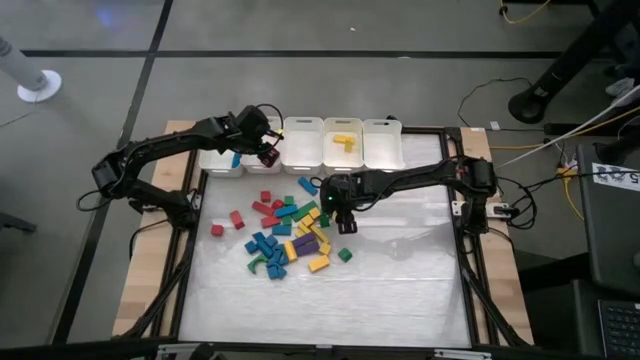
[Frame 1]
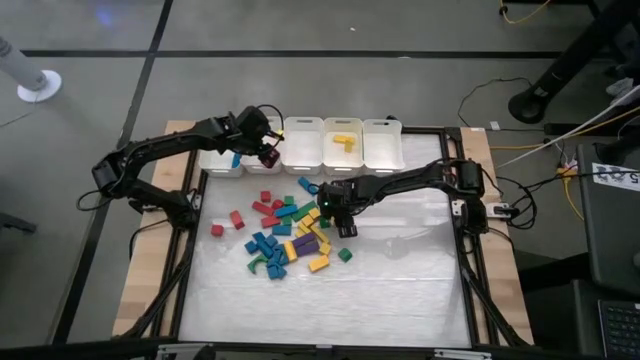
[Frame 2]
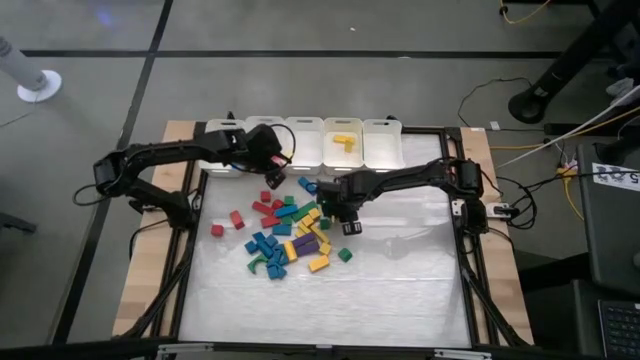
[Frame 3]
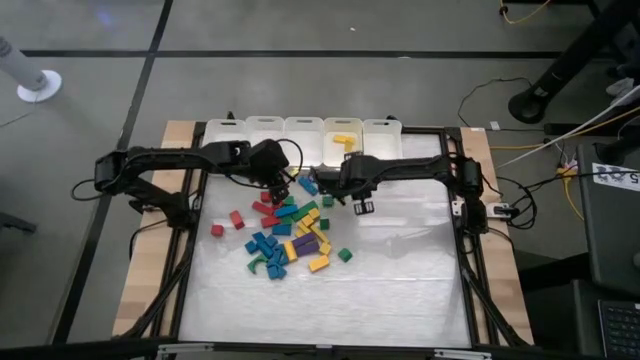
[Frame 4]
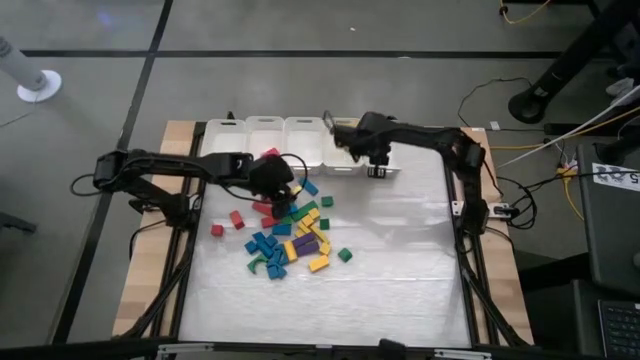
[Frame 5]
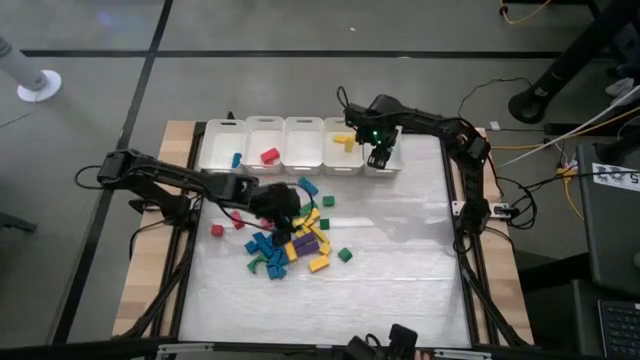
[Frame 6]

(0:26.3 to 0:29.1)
Task: Sort blocks
Put the green block into the right white bin

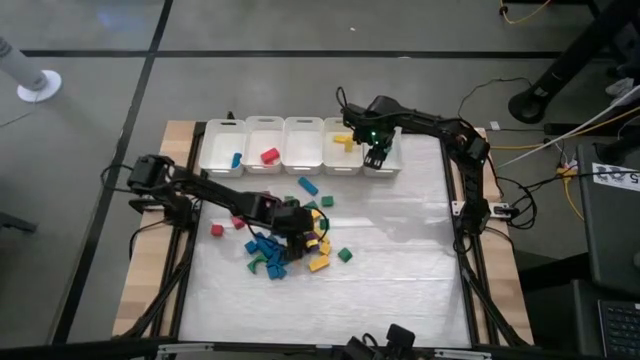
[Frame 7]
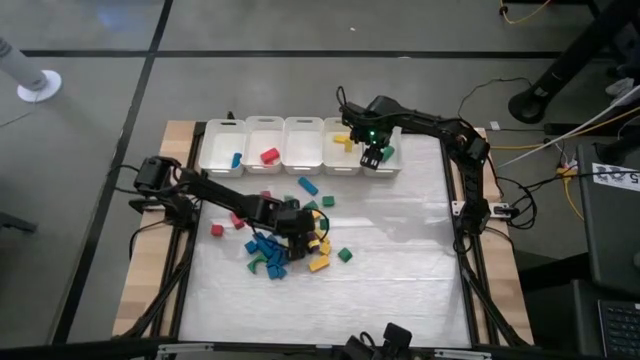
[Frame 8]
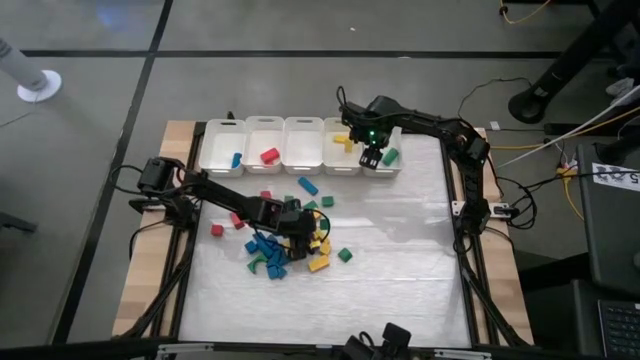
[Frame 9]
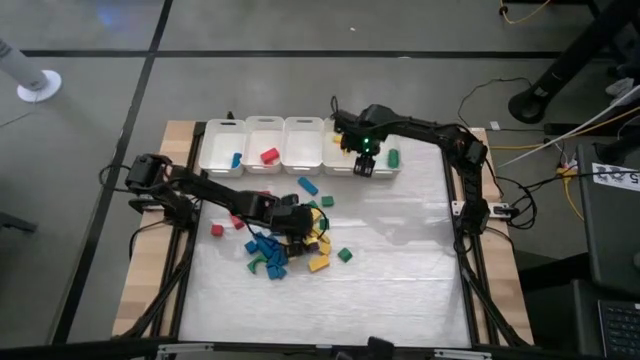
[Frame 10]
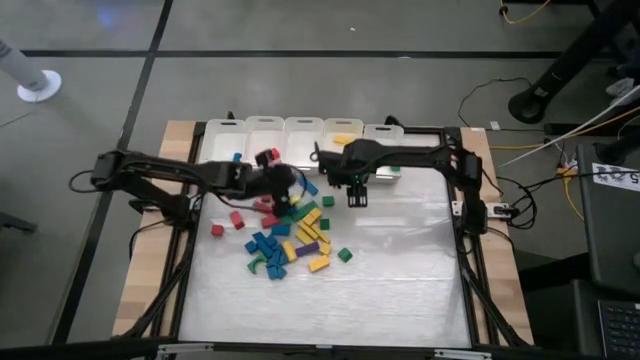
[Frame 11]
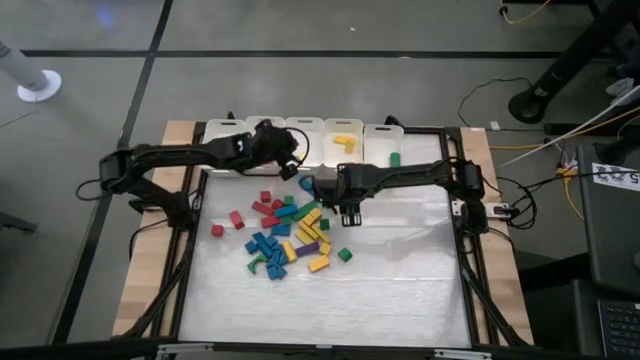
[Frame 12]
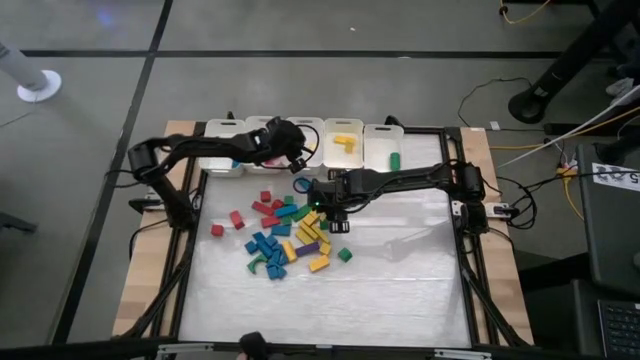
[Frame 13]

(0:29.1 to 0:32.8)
Put the violet block into the middle white bin

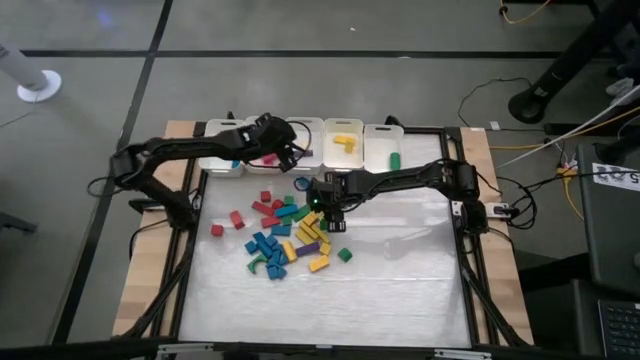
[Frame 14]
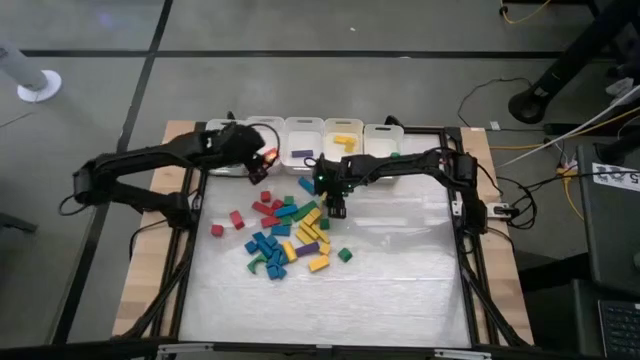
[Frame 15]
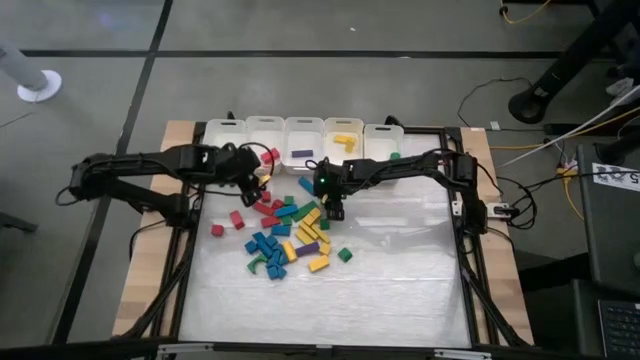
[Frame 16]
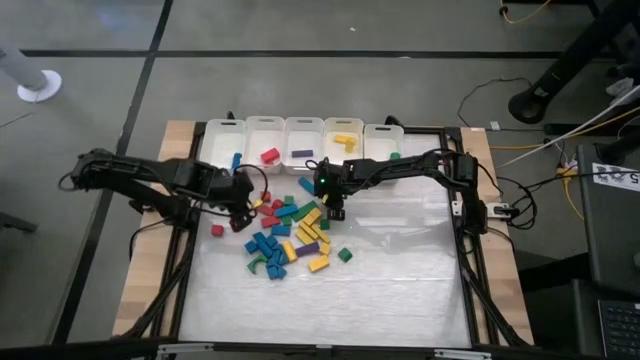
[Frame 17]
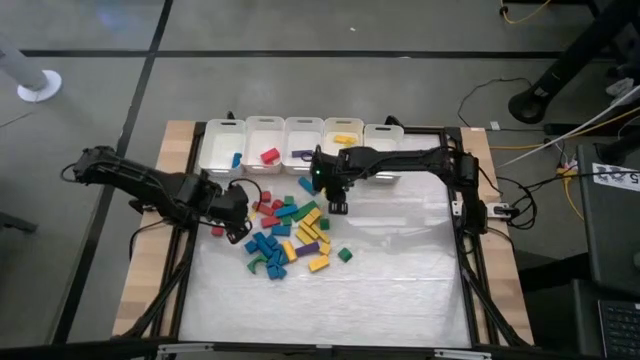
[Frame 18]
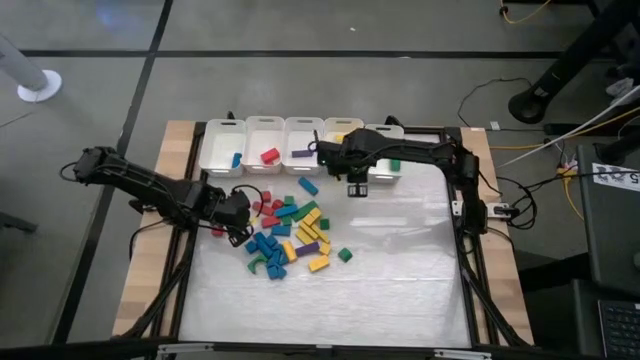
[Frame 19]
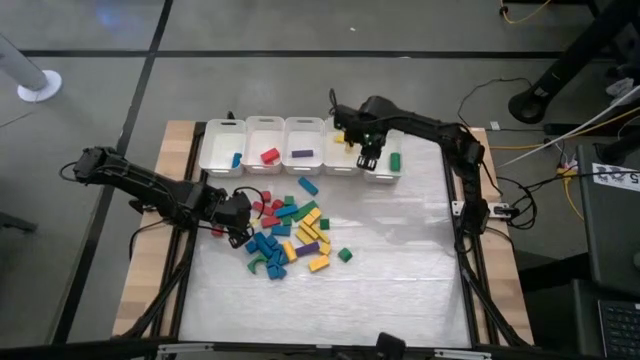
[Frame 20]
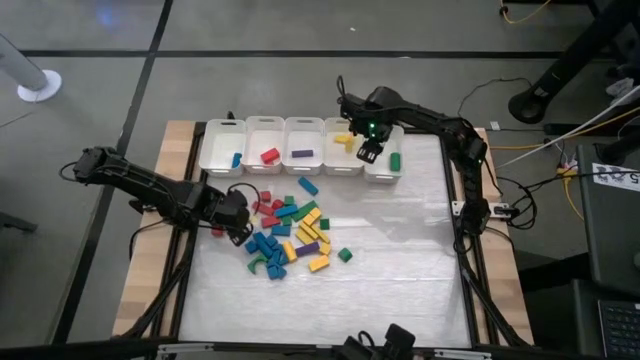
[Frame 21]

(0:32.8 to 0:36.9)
Put the green block into the right white bin

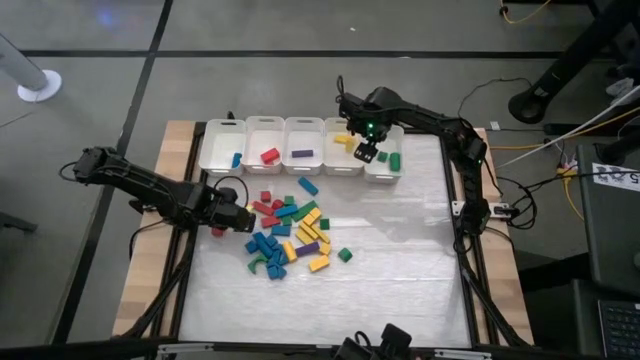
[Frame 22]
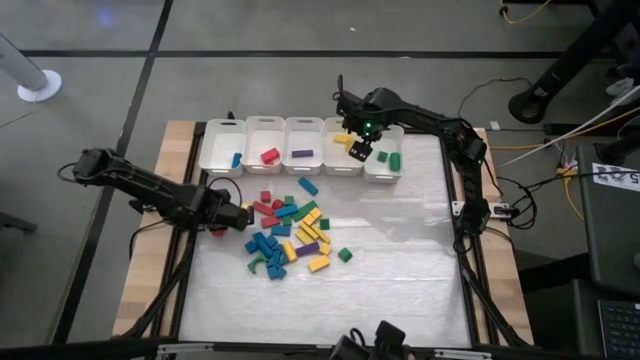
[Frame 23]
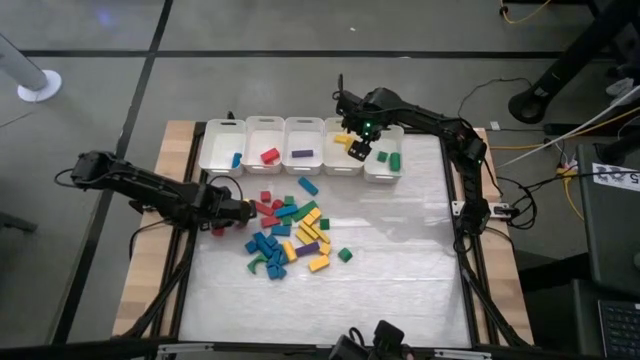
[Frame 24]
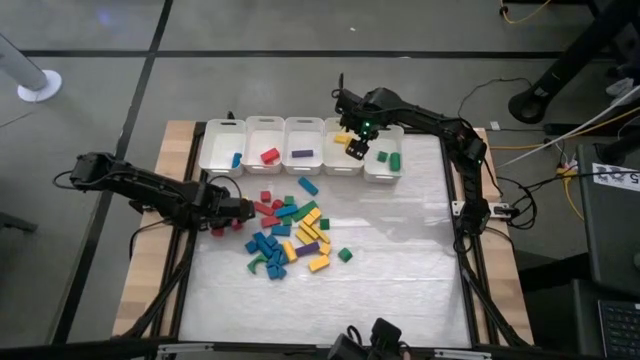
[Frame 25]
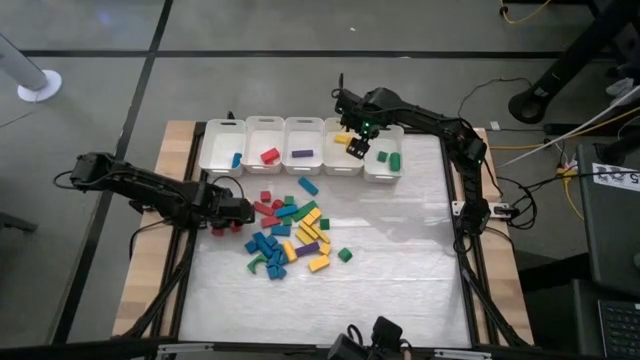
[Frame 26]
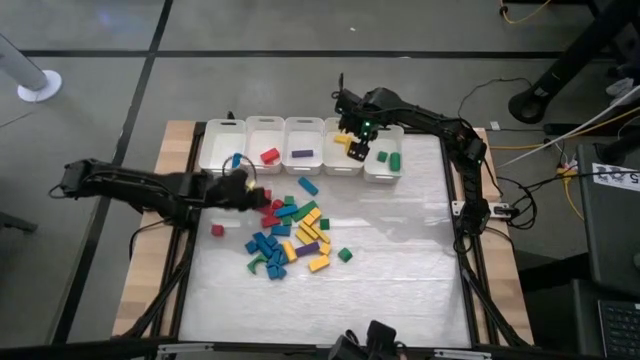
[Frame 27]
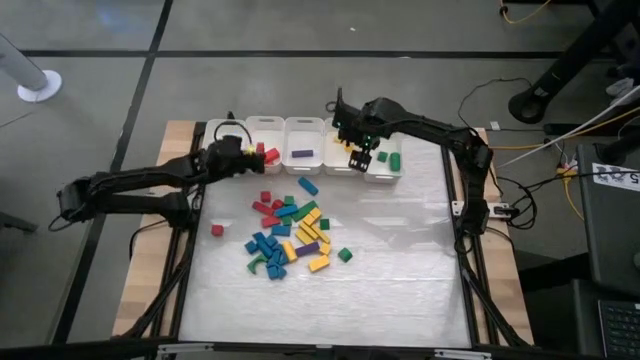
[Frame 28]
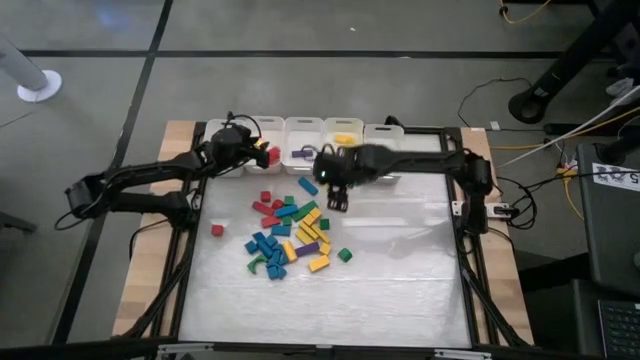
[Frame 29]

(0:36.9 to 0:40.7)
Put the red block into the middle left white bin

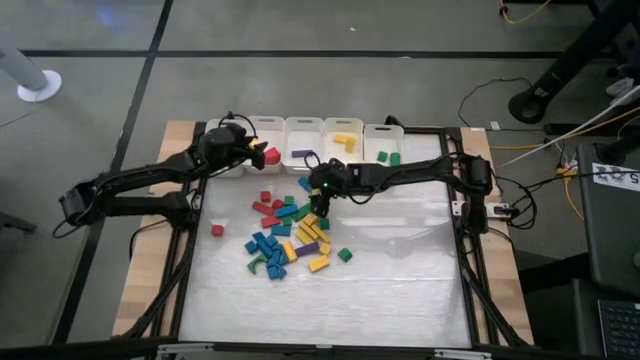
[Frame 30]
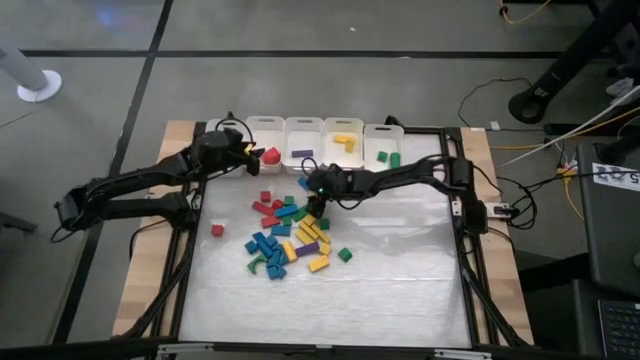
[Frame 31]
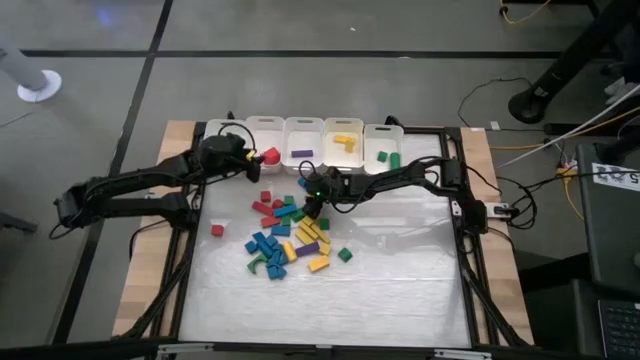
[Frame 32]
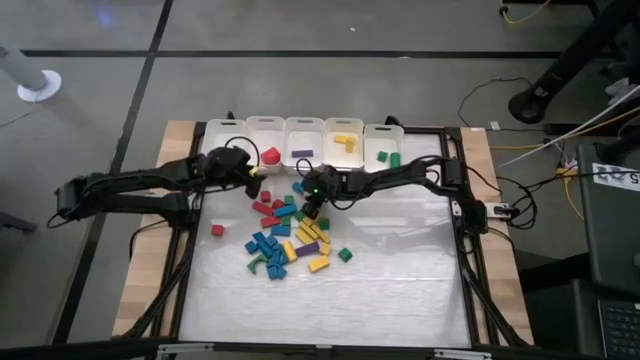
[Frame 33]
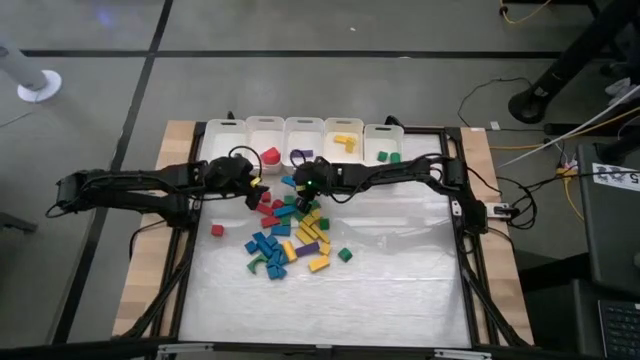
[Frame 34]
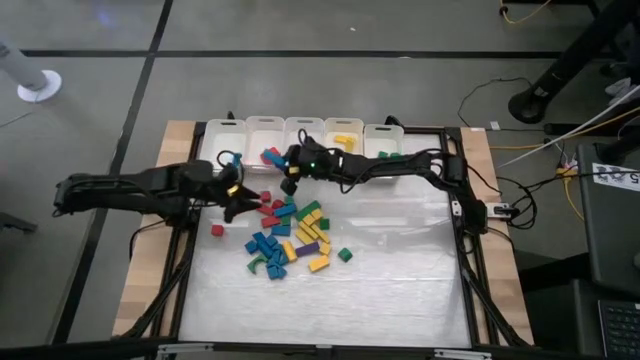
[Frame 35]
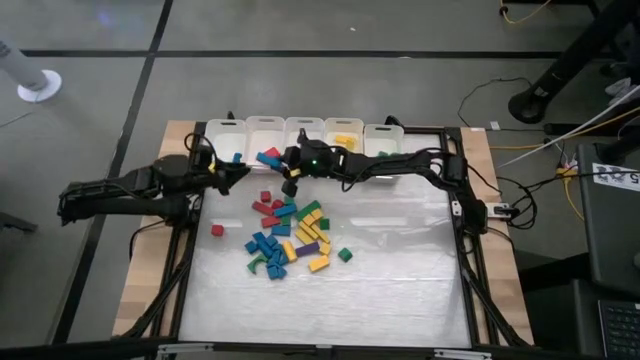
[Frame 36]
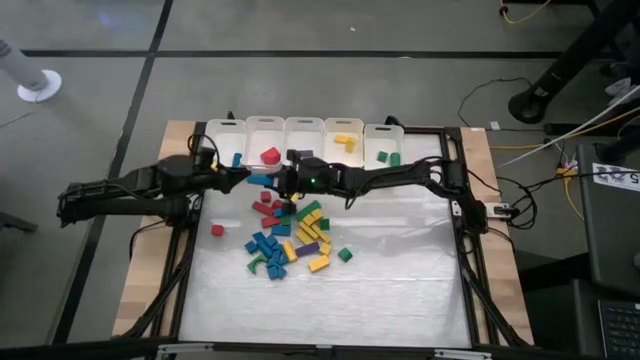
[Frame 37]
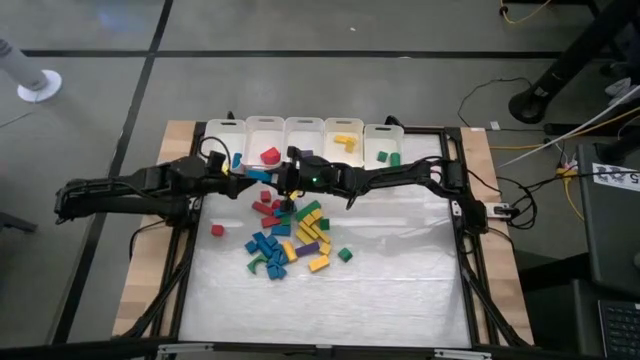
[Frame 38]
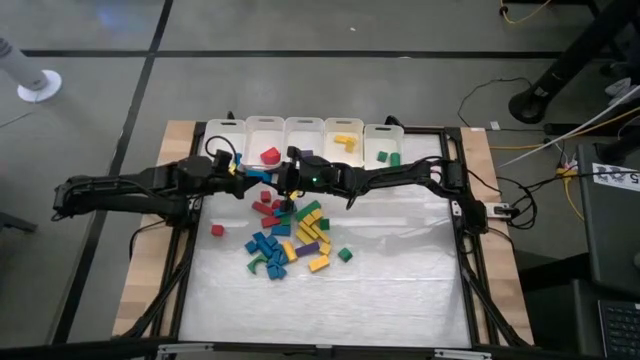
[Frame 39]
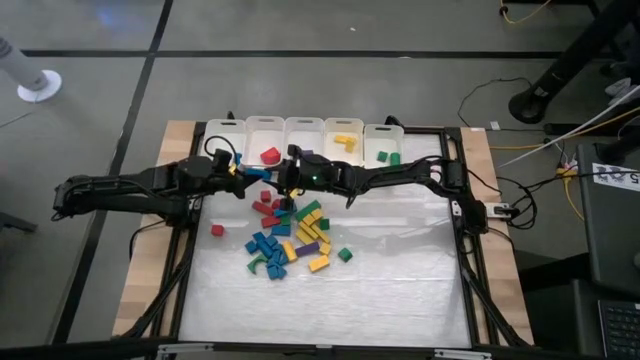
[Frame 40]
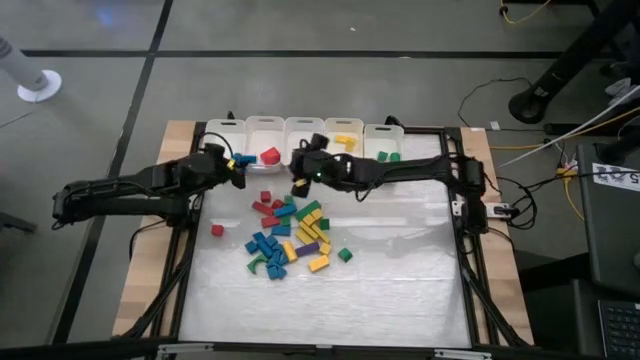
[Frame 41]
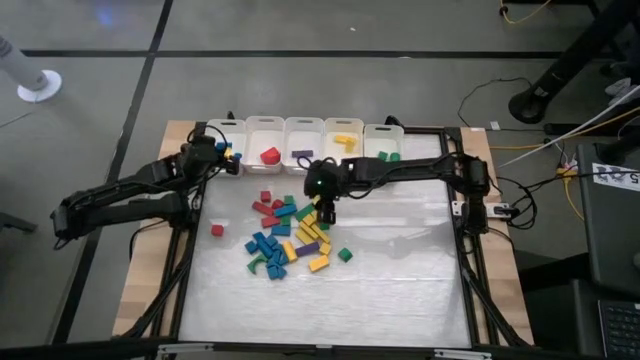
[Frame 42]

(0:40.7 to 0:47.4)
Put the blue block into the left white bin

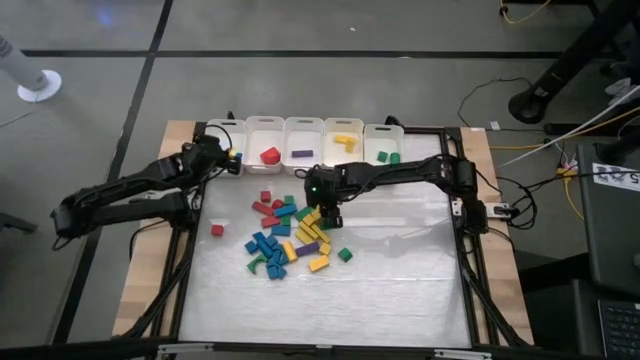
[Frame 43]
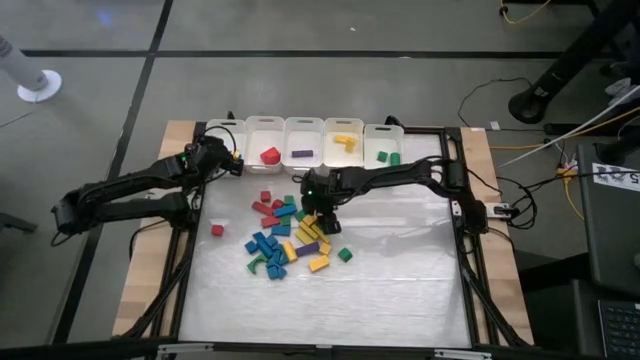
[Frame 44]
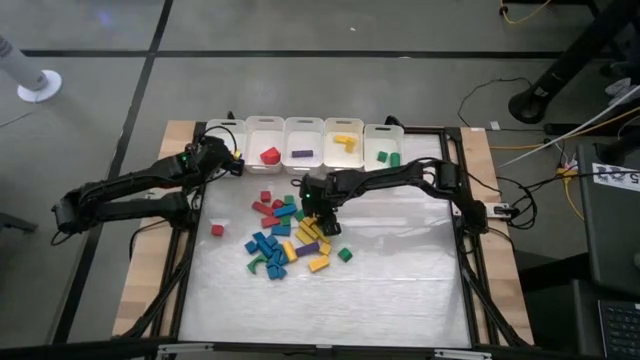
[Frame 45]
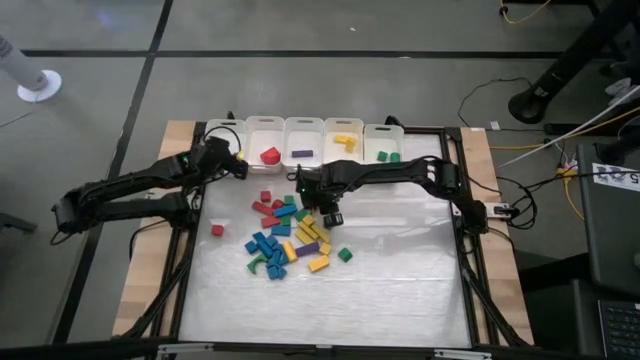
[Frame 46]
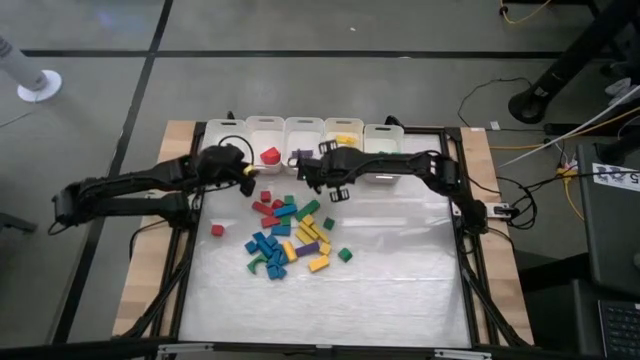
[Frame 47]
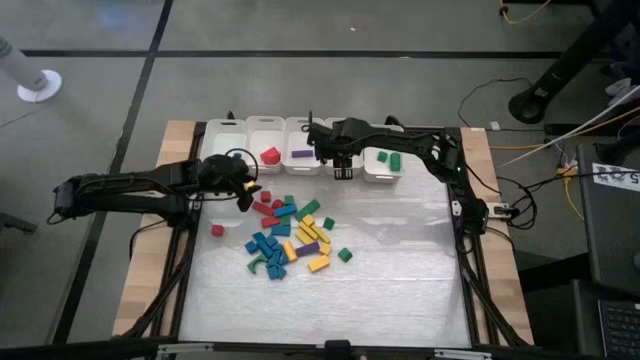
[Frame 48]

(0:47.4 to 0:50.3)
Put the yellow block into the middle right white bin
